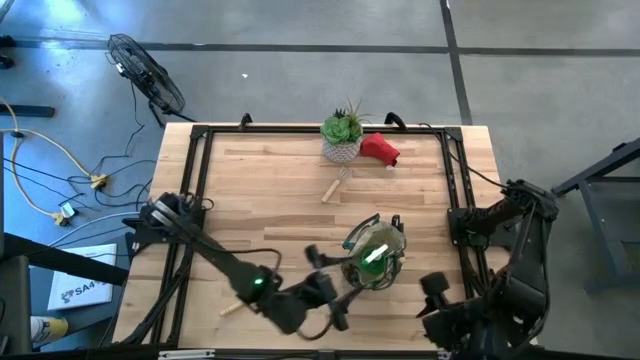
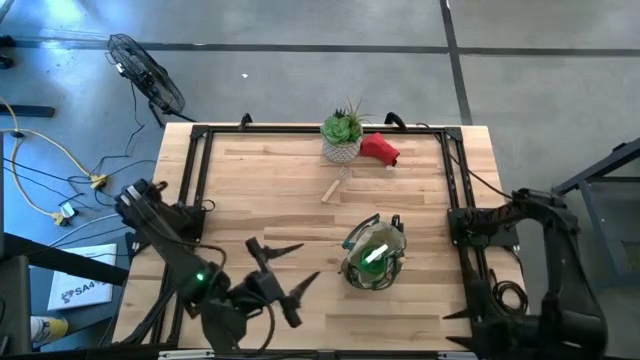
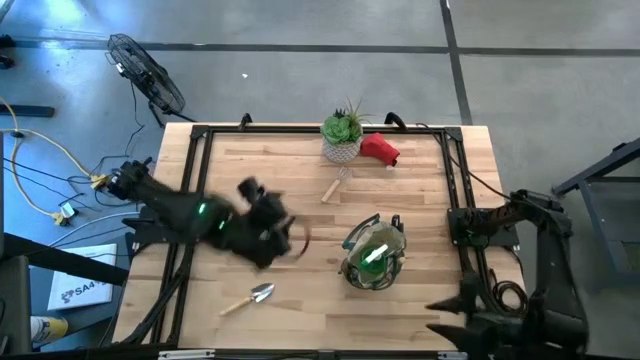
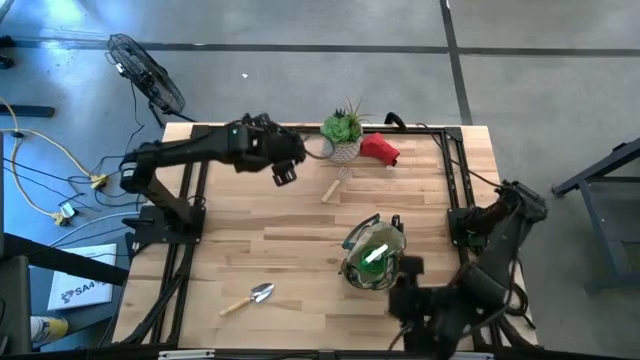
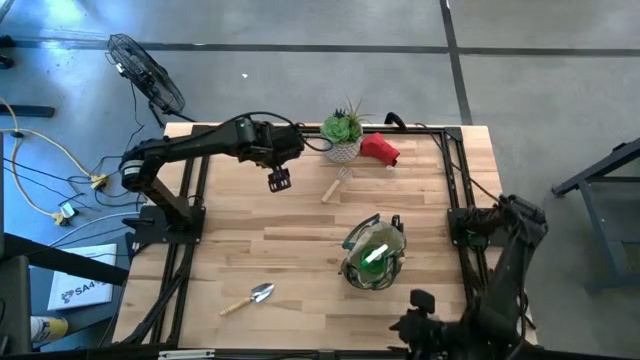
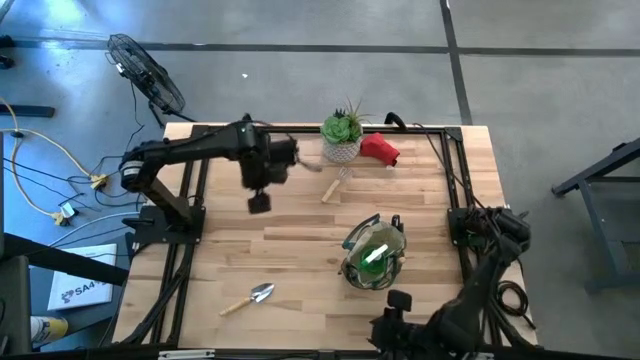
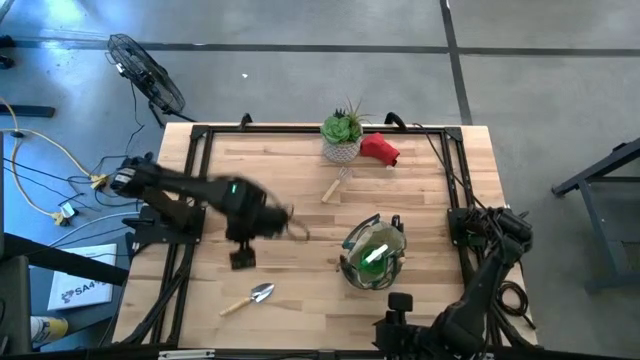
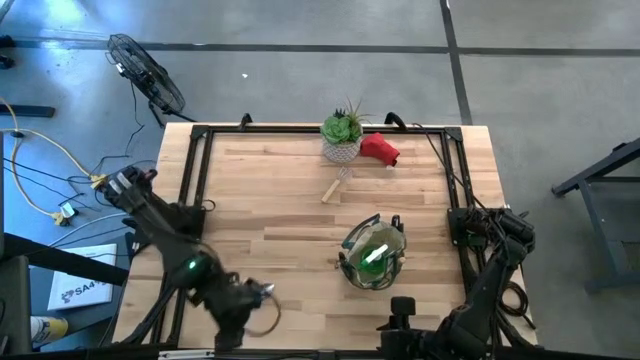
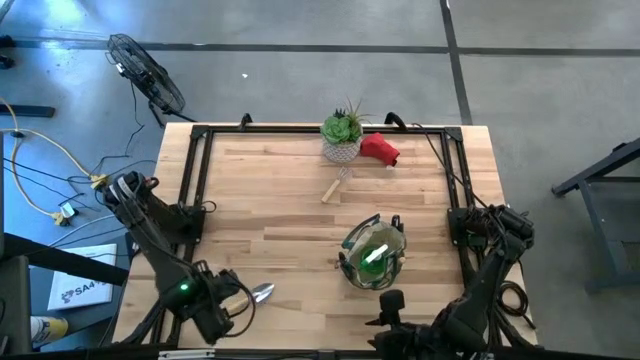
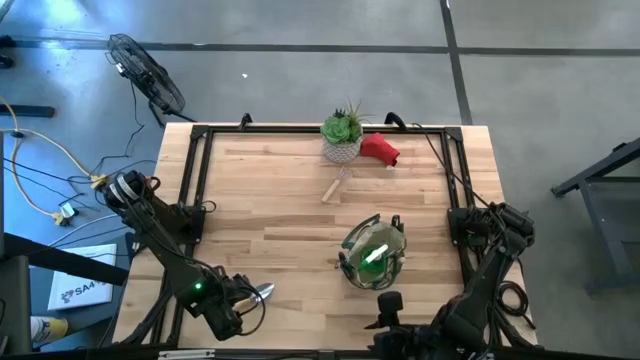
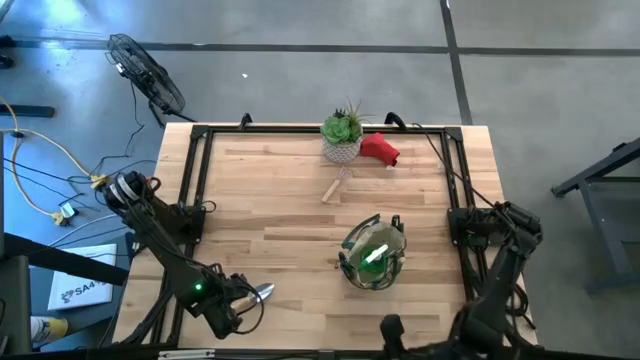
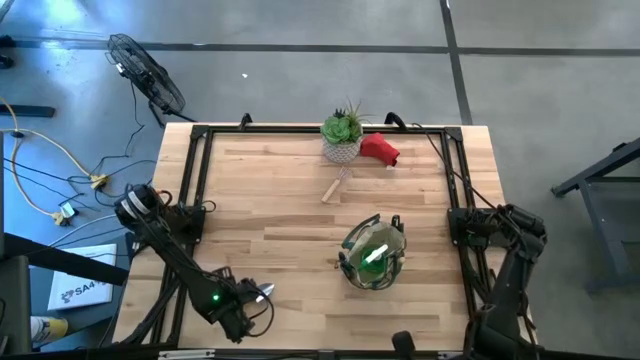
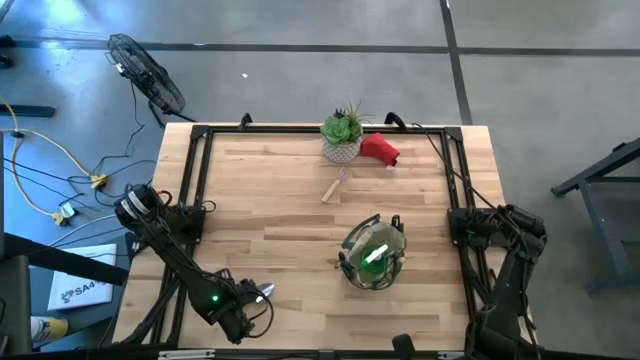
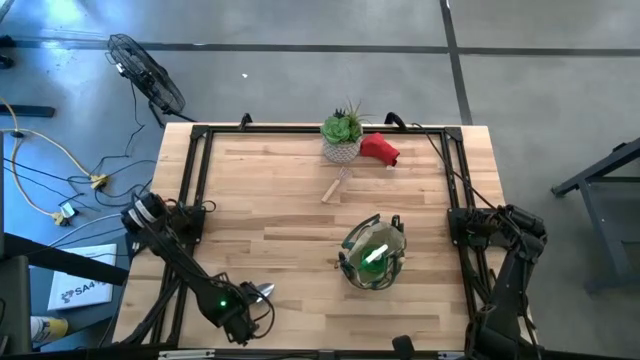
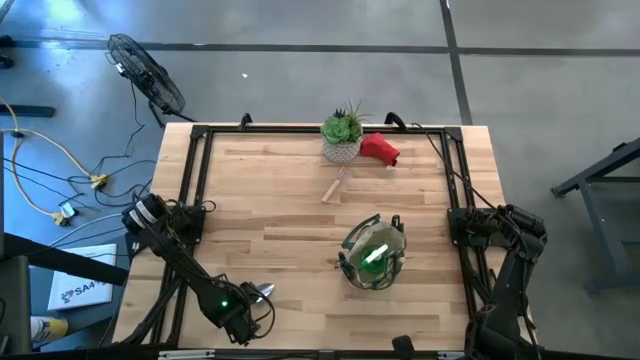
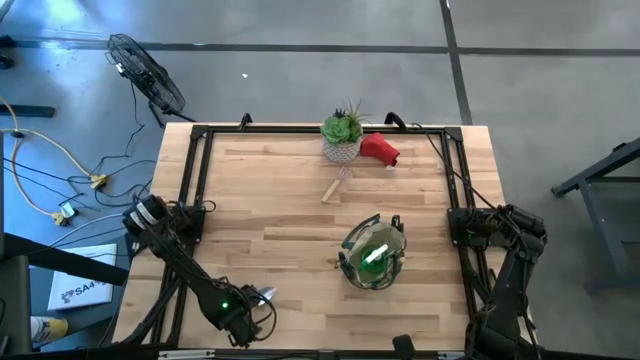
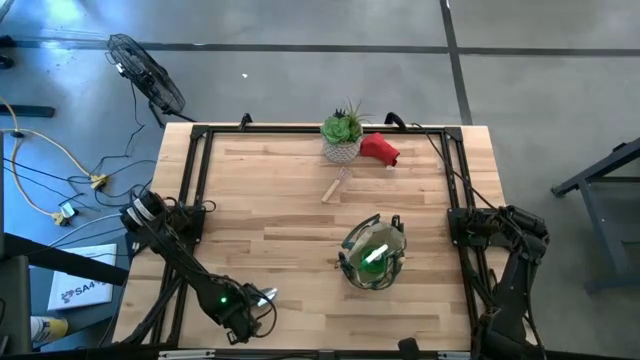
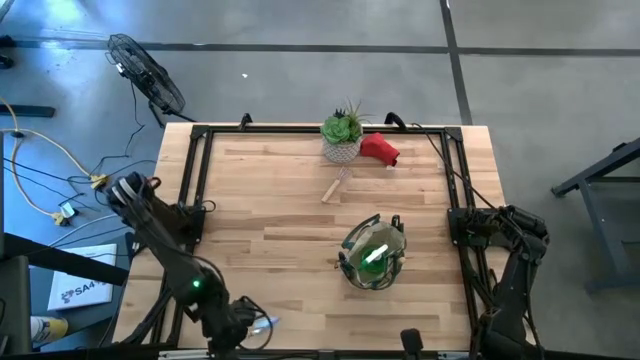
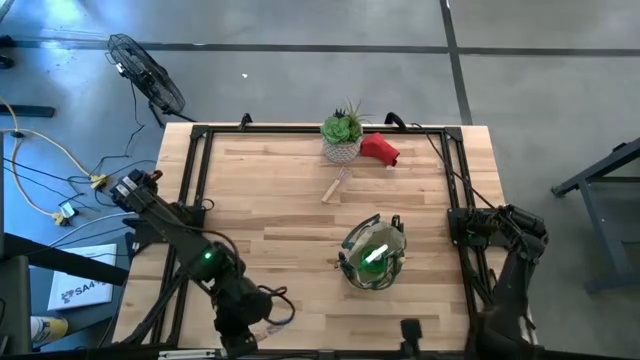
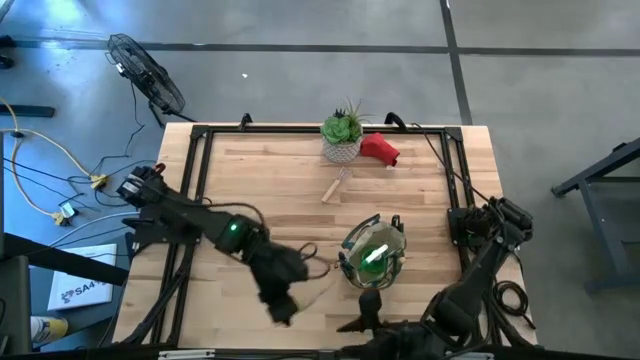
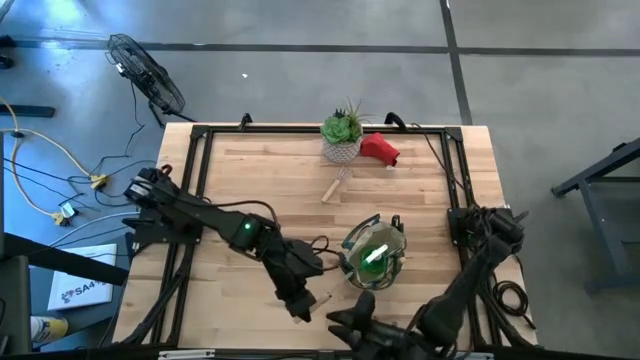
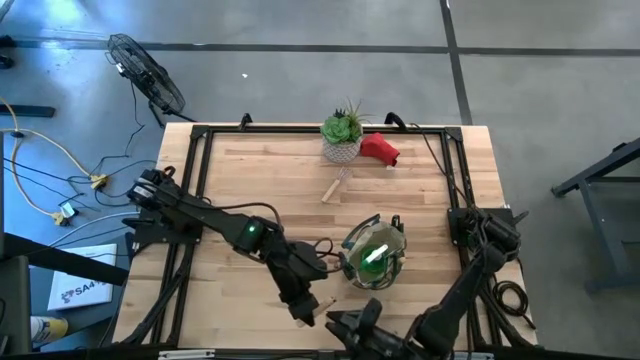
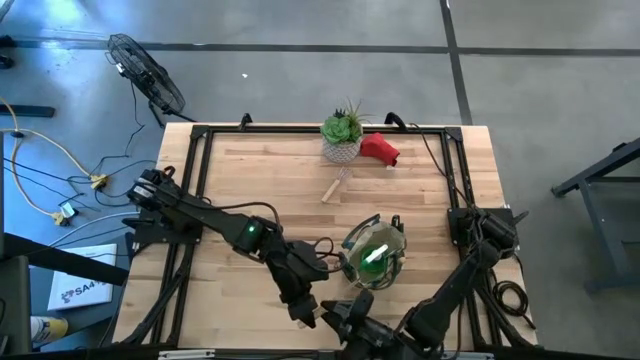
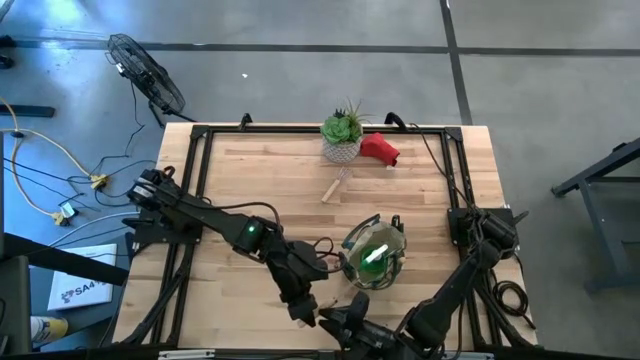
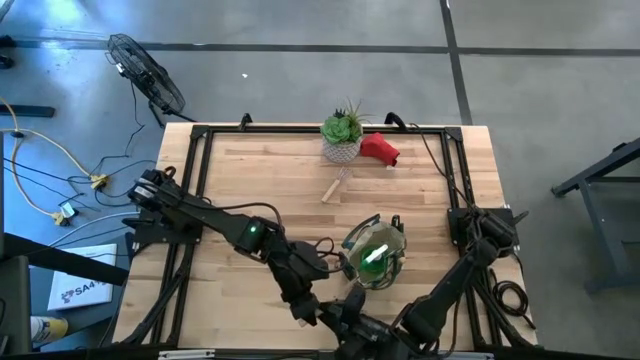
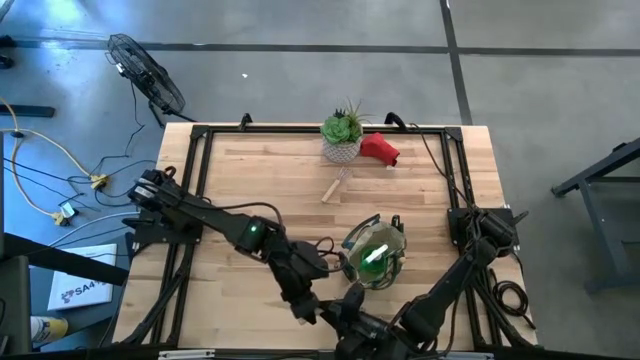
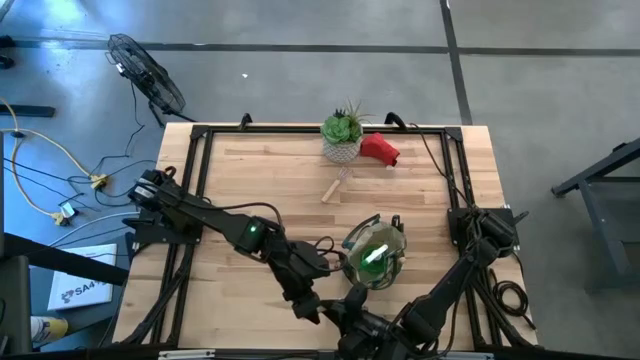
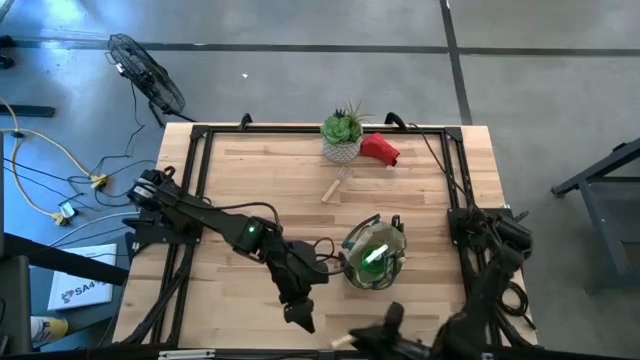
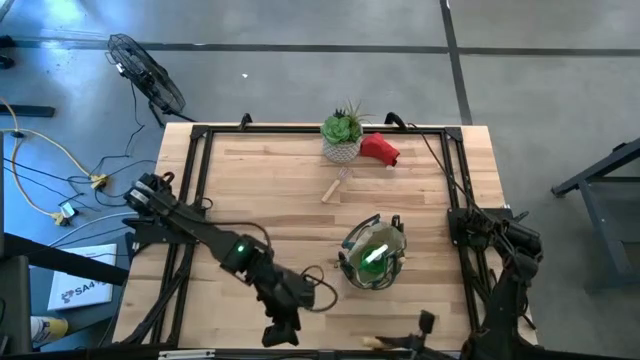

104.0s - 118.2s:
Task: Pick & Place Garden tools in Gardening bag
Put the brown trowel into the gardening bag

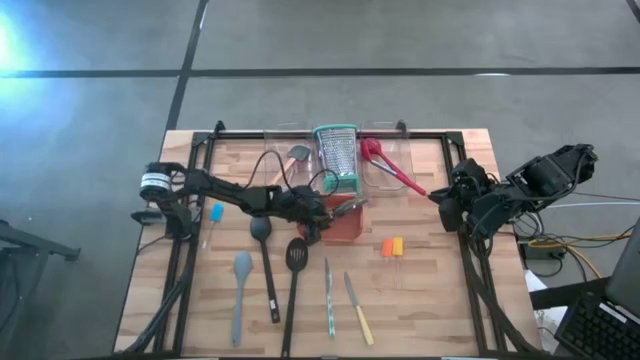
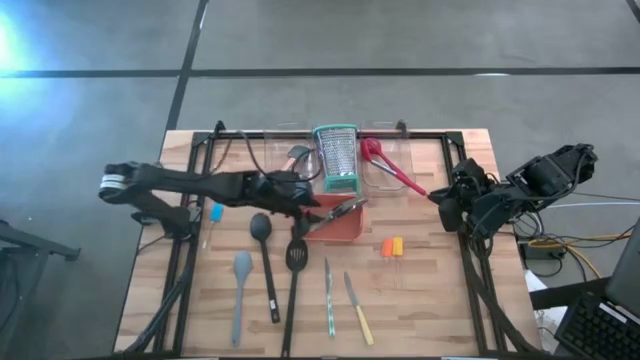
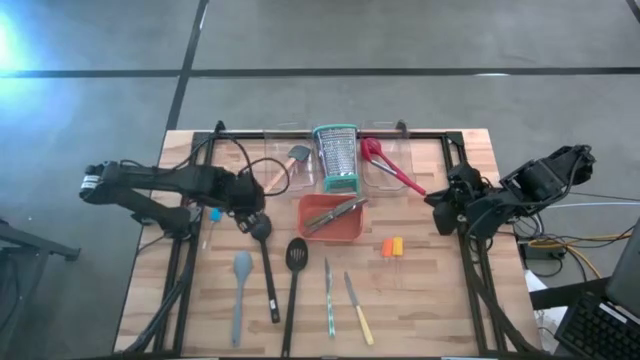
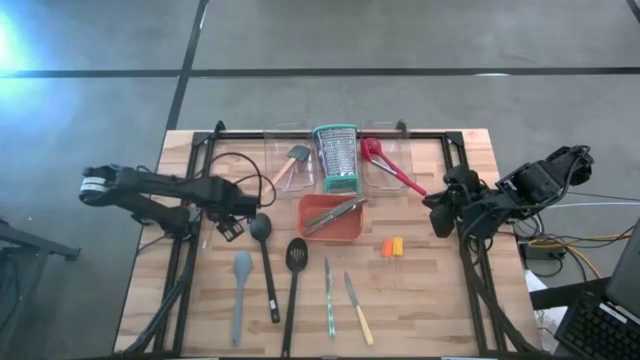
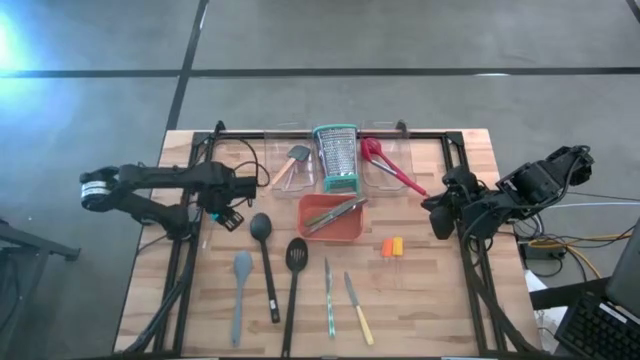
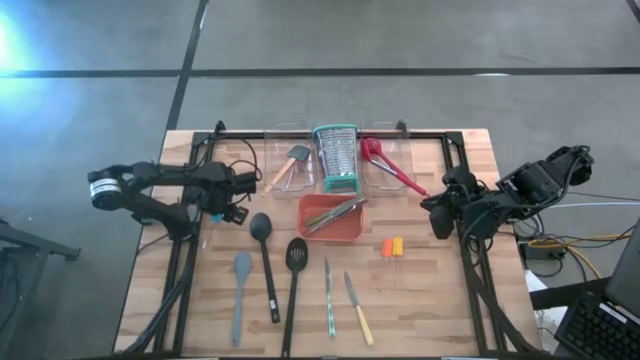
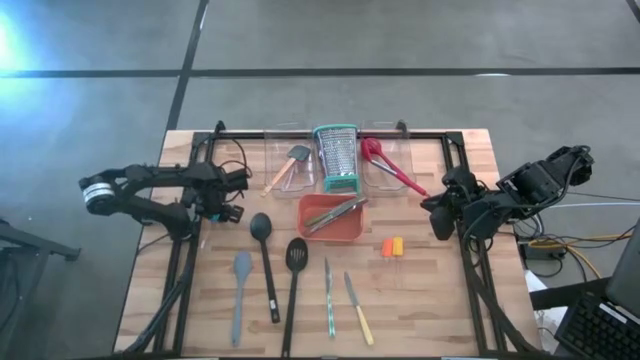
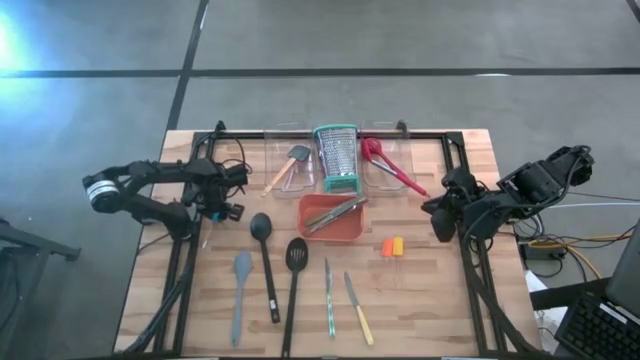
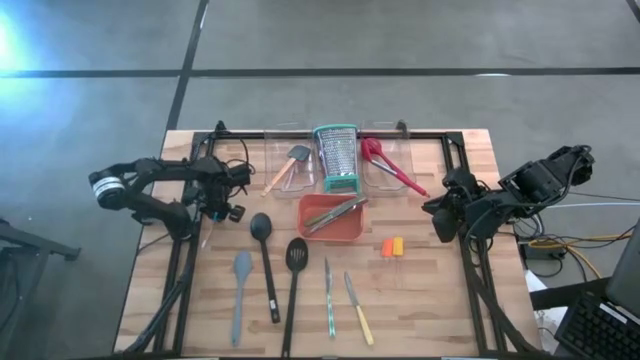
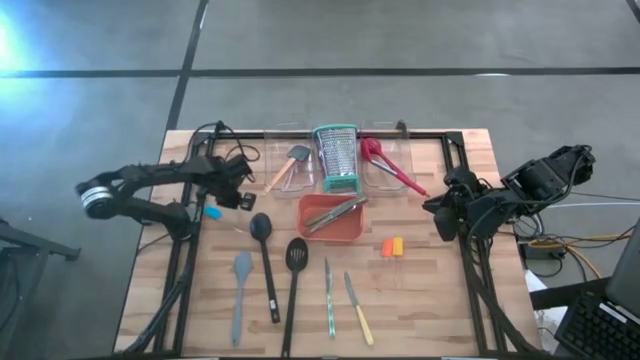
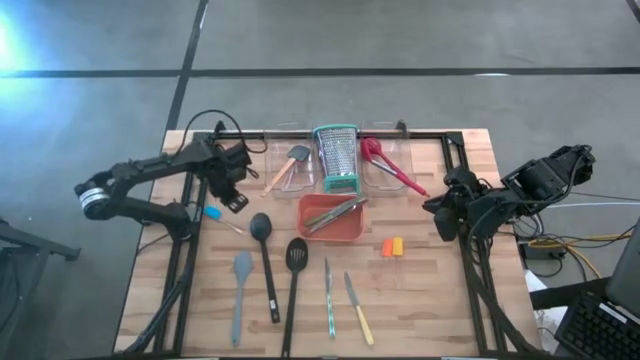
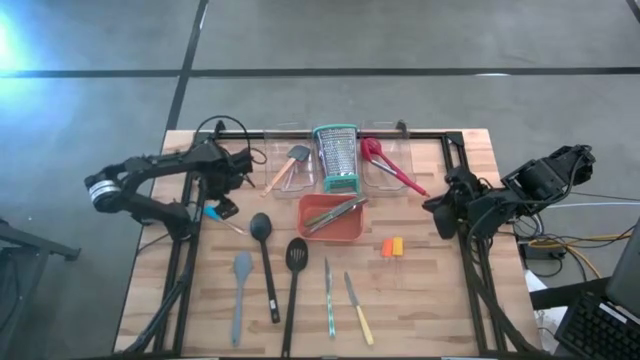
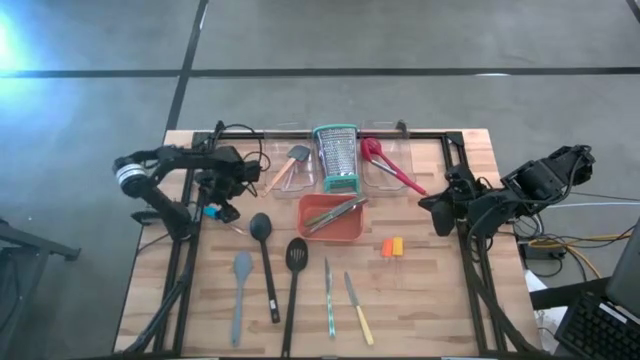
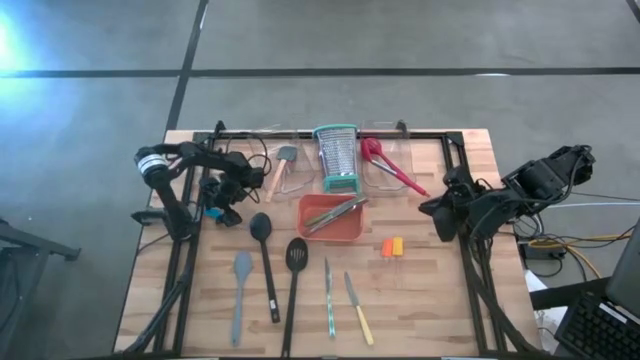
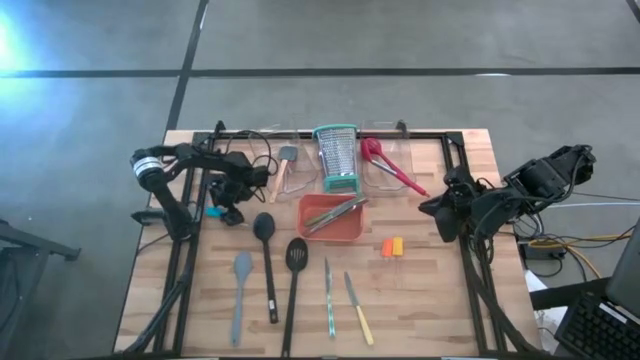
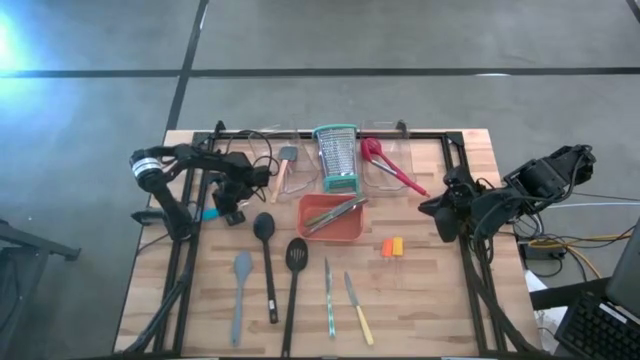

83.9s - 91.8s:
Task: Pick & Place Kitchen Items
Put the blue spatula into the left transparent bin
